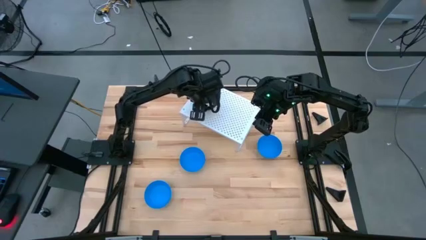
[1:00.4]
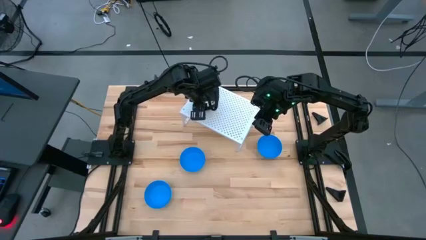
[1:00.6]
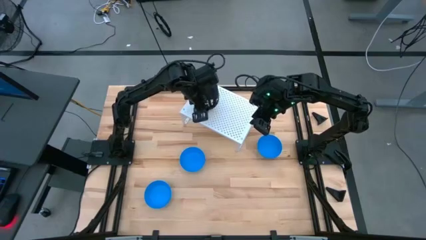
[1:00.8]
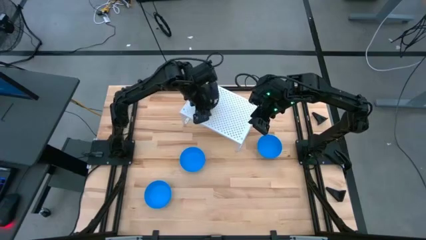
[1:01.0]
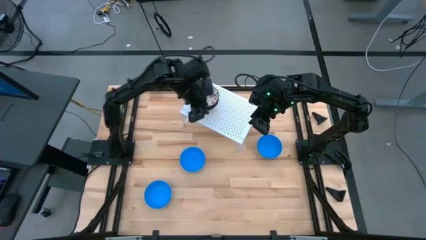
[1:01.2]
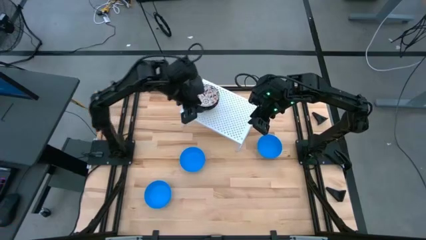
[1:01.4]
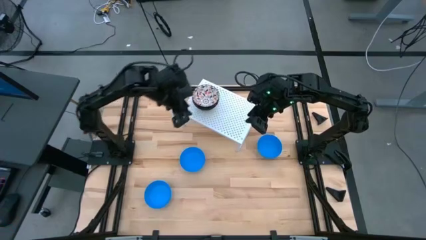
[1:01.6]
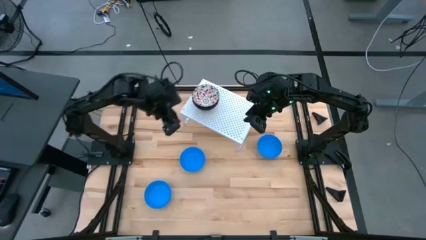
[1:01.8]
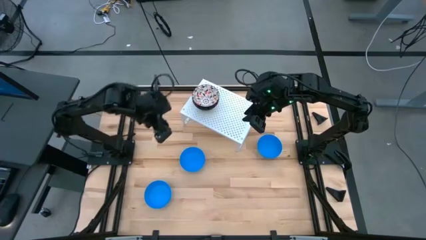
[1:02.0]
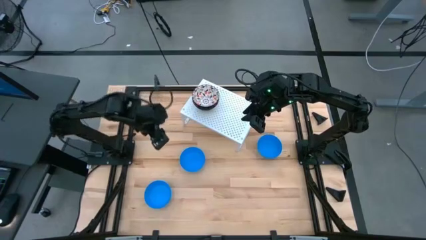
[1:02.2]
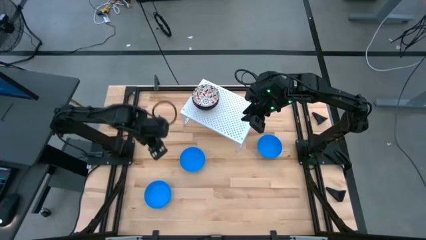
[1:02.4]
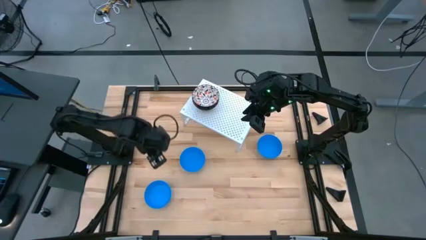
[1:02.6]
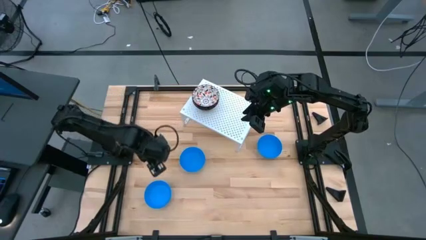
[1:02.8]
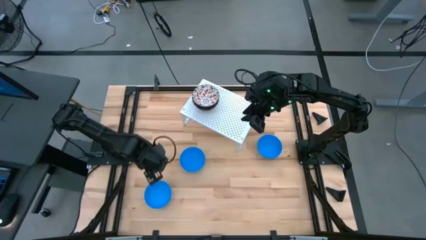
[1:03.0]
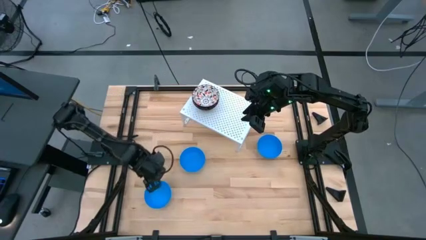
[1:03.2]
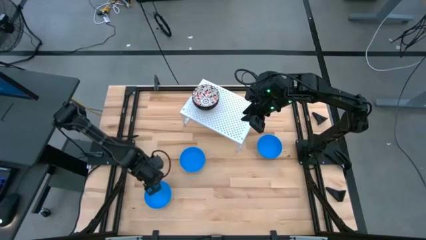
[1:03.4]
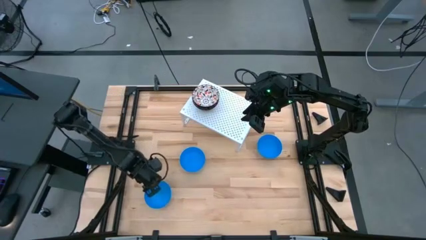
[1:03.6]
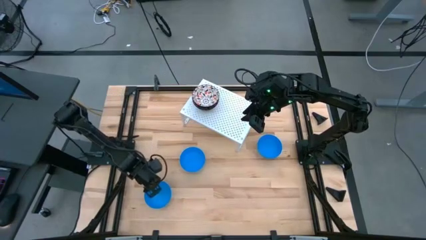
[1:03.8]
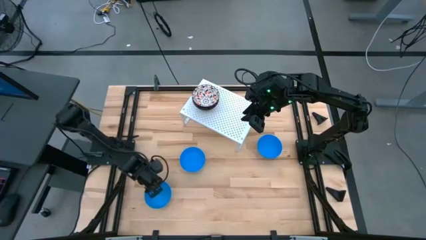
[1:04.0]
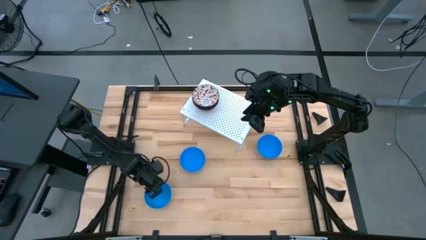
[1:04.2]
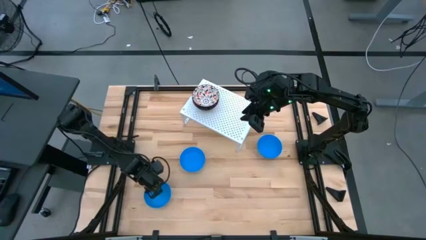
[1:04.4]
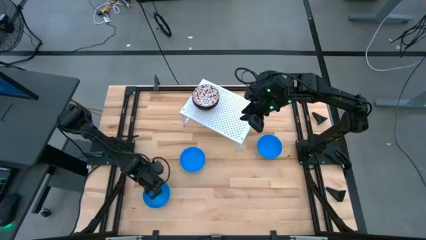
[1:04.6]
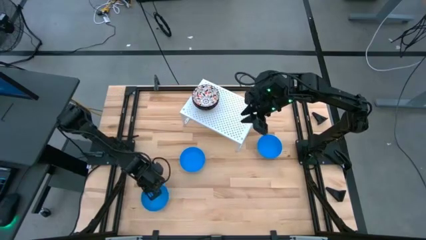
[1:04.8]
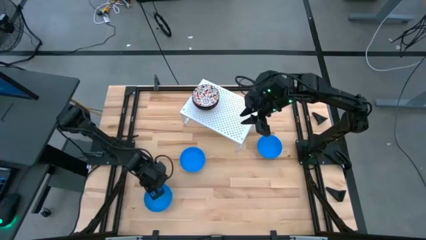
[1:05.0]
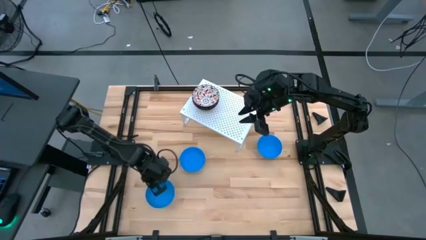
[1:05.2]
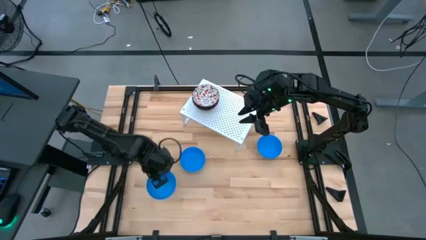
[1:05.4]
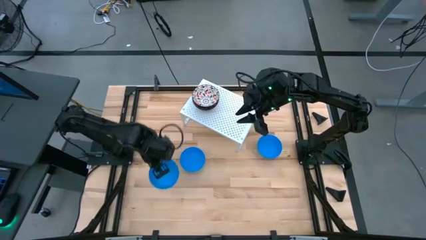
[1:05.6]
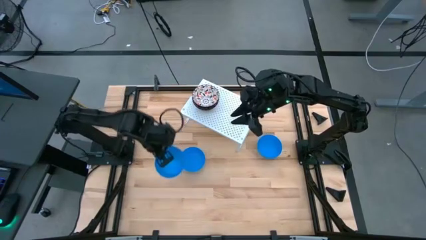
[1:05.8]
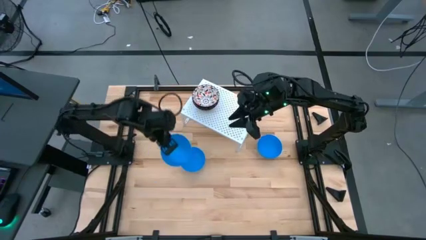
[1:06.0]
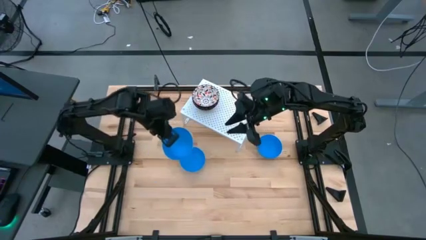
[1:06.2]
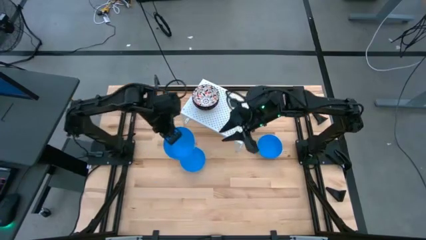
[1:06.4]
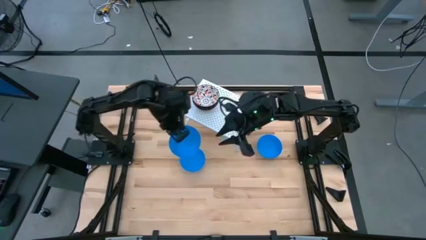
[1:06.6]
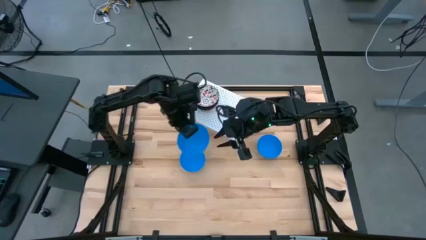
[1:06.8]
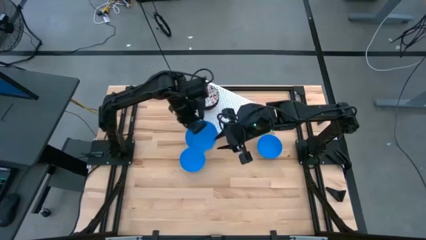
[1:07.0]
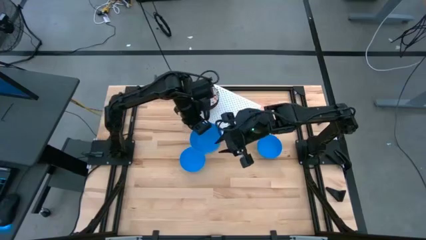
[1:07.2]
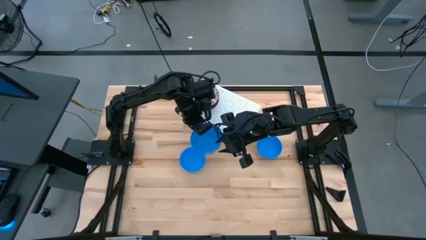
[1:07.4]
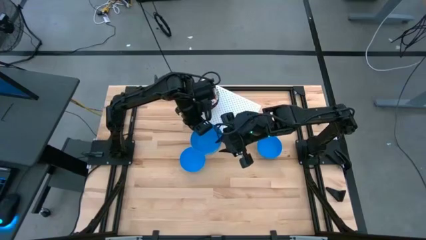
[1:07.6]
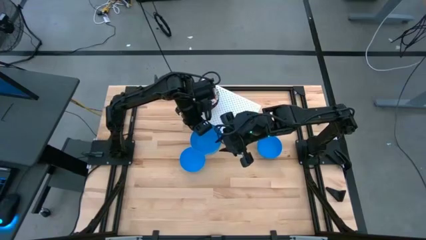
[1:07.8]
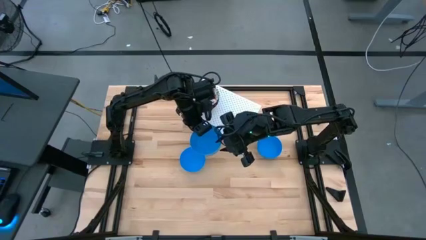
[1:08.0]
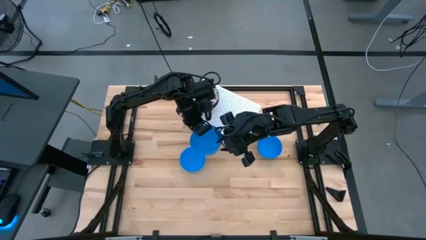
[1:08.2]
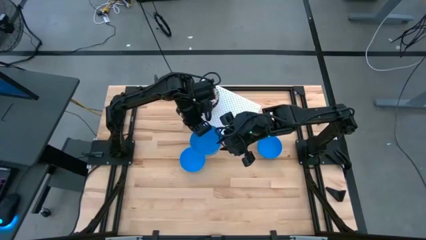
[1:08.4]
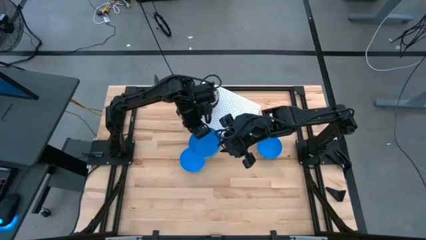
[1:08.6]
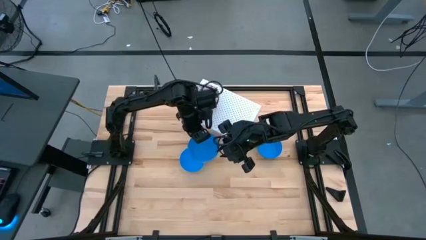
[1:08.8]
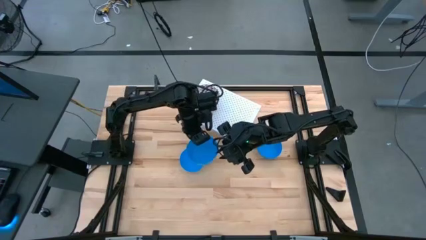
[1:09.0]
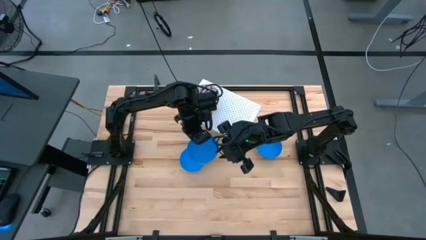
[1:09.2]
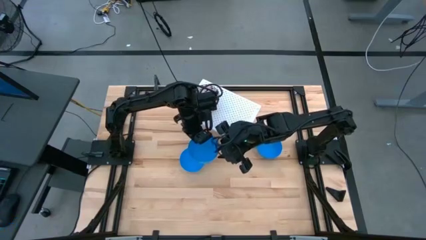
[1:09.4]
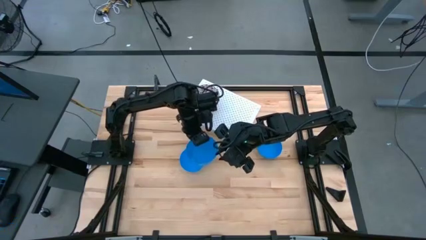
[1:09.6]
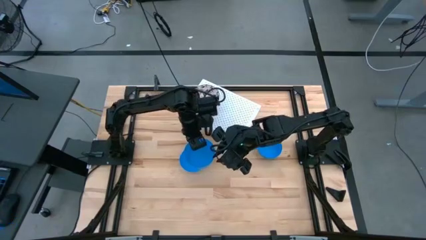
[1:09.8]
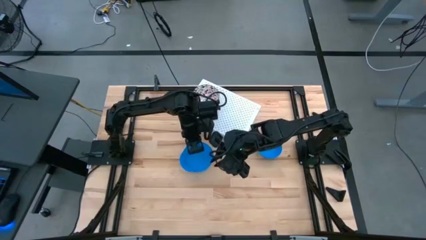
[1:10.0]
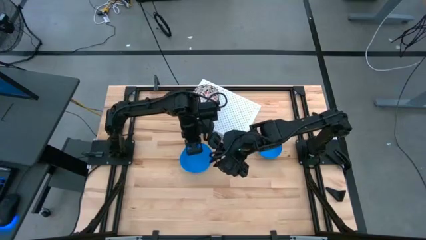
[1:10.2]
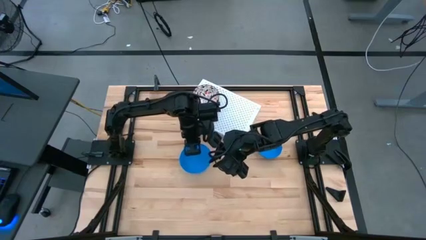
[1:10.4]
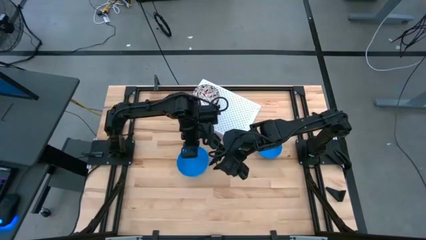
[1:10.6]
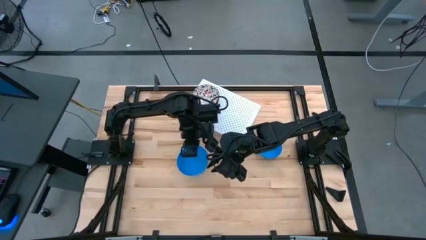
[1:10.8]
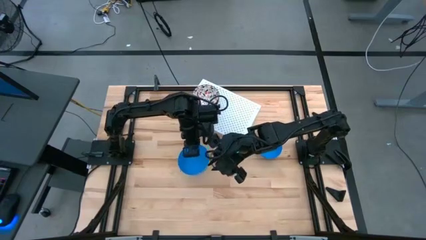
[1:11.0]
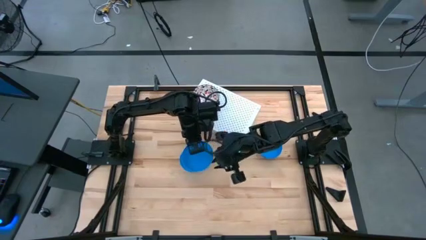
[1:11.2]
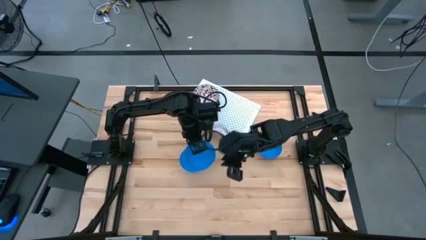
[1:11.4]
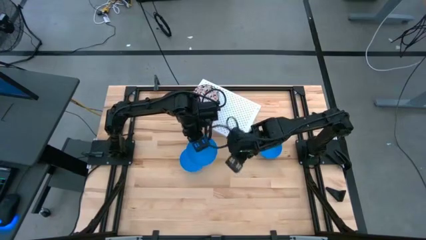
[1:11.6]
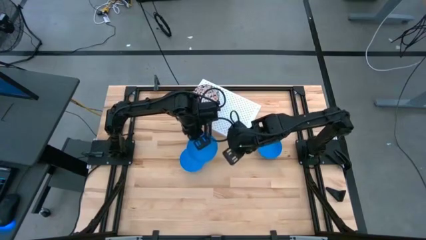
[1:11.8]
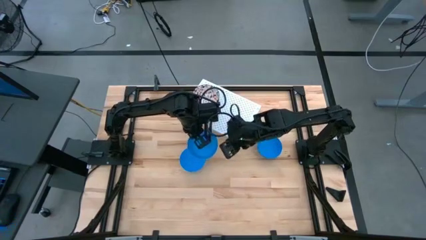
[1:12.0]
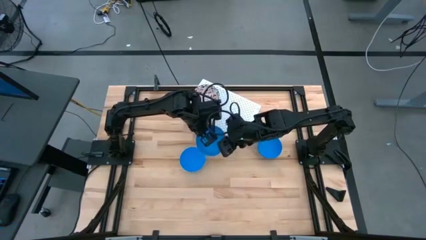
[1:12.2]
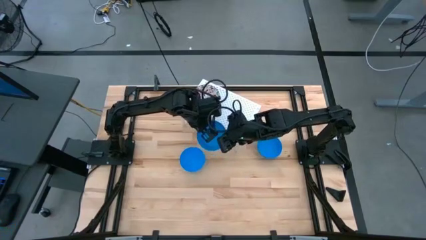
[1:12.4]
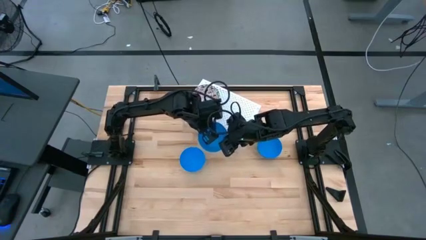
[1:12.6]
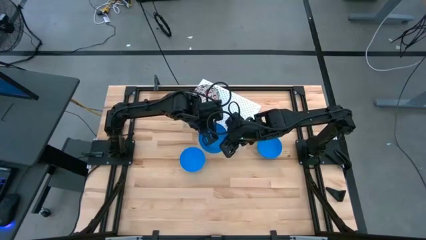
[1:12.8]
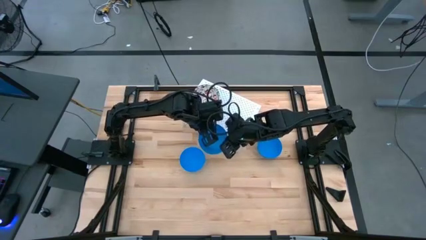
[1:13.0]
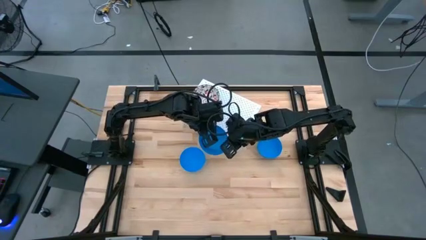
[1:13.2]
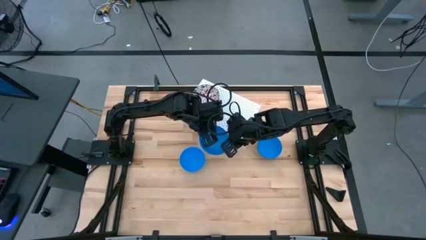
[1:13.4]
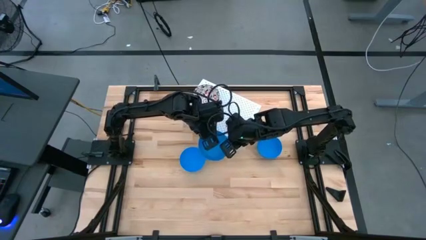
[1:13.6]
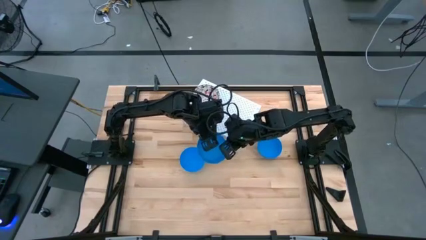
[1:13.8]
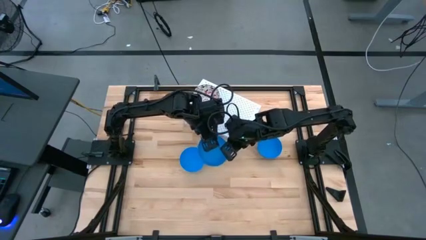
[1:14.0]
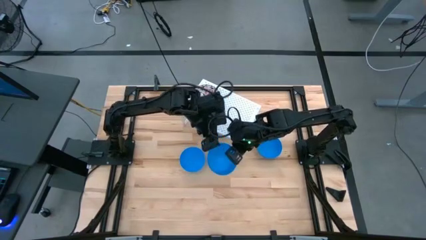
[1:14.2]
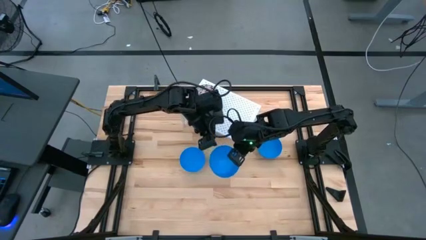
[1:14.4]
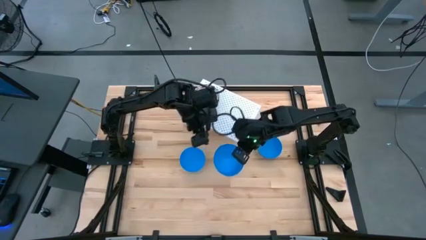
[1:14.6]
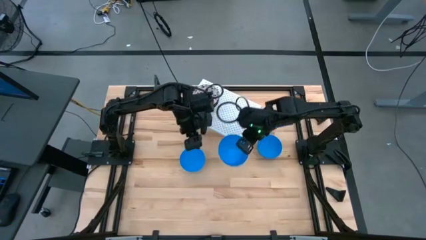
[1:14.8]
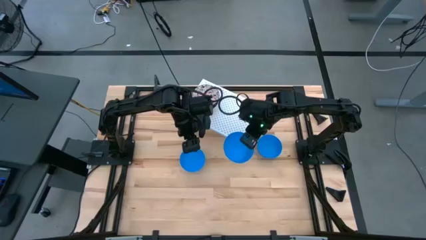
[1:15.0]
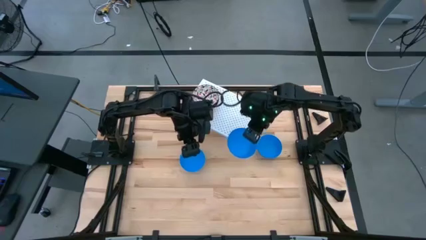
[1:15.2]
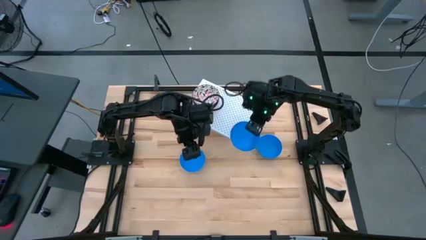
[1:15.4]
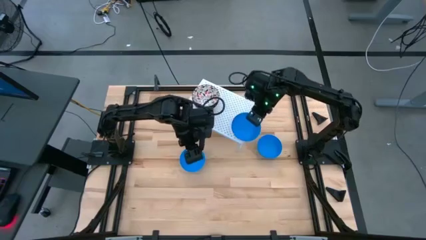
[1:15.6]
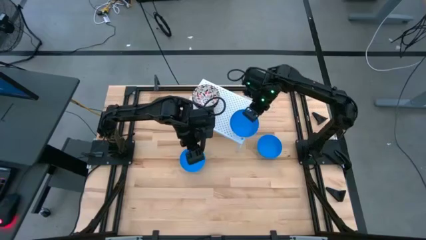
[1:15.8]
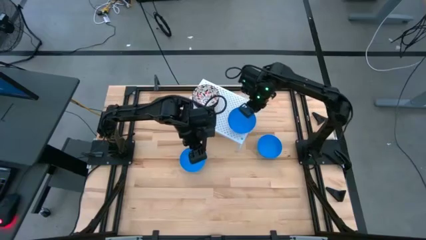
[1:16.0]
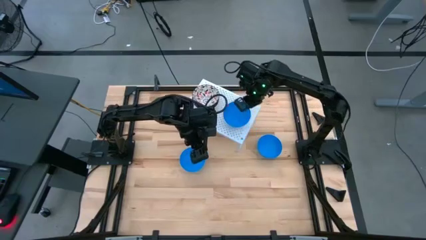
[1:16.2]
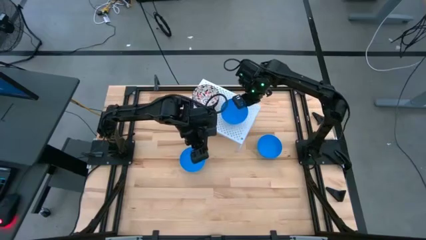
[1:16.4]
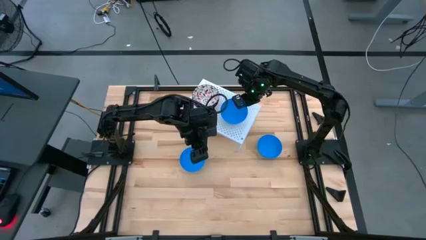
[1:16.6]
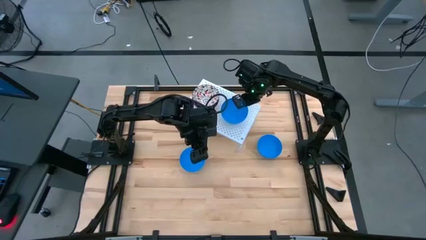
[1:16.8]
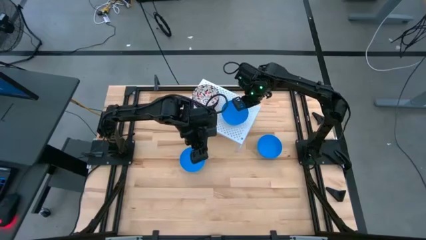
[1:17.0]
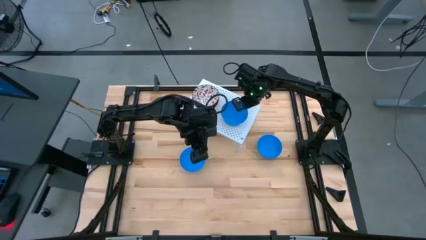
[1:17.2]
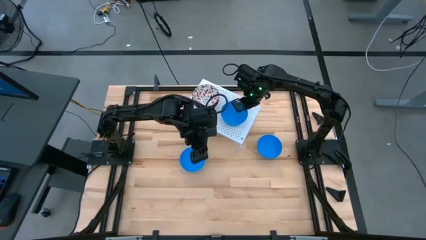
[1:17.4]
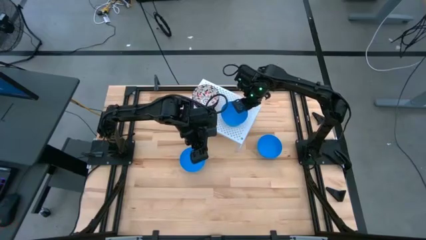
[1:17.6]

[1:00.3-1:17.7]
Task: Pick & Place Mini bowls
Put the bottom blue bowl on the shelf
